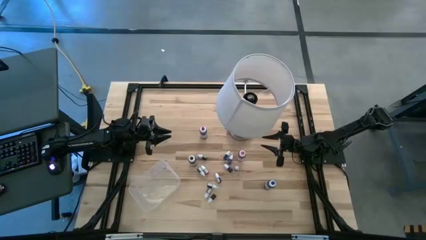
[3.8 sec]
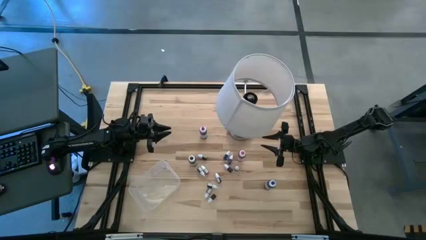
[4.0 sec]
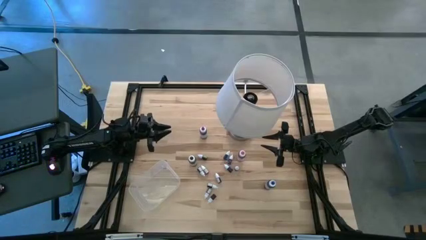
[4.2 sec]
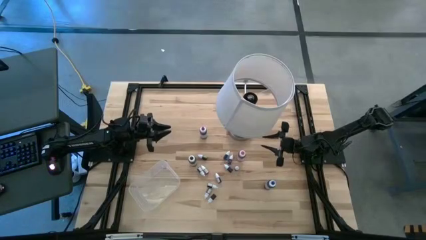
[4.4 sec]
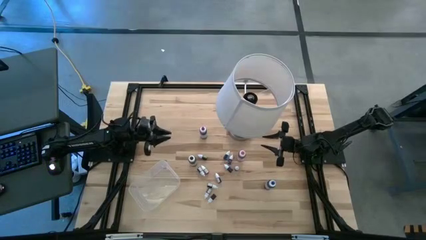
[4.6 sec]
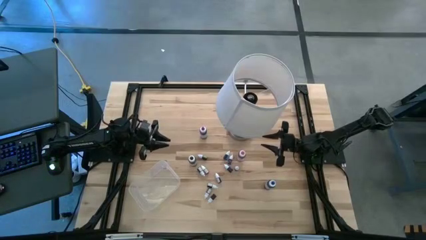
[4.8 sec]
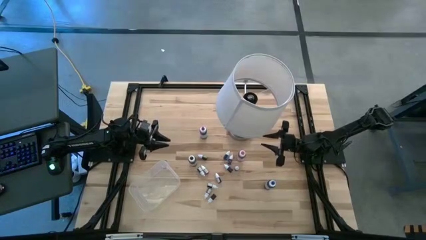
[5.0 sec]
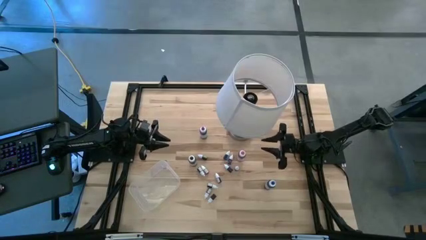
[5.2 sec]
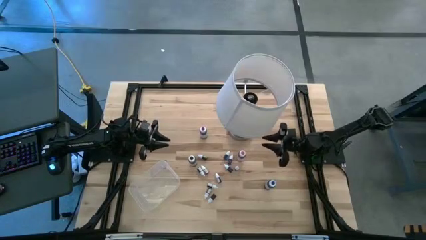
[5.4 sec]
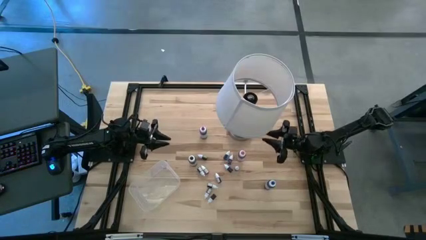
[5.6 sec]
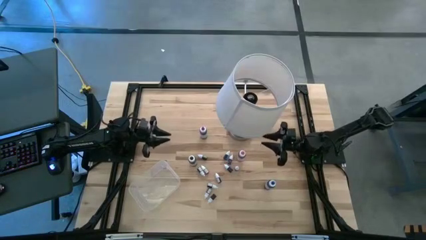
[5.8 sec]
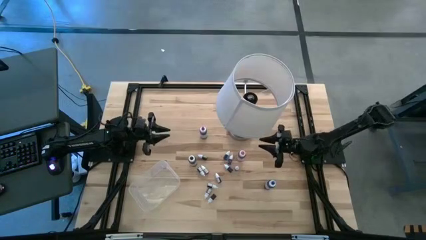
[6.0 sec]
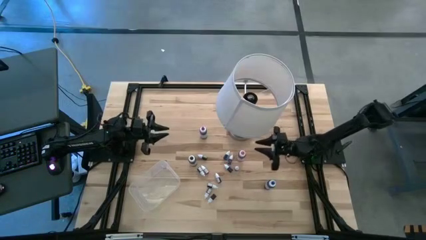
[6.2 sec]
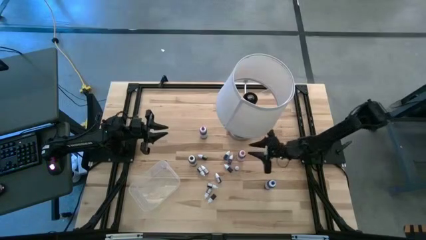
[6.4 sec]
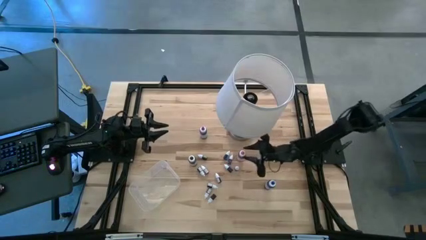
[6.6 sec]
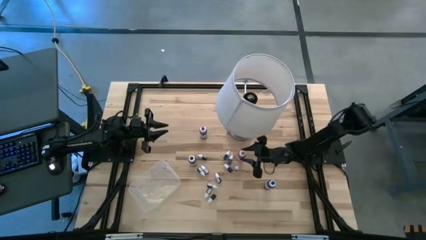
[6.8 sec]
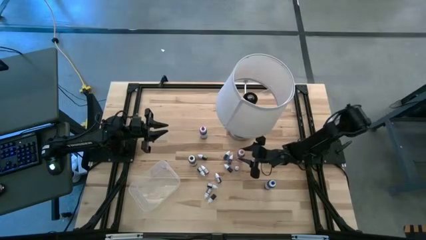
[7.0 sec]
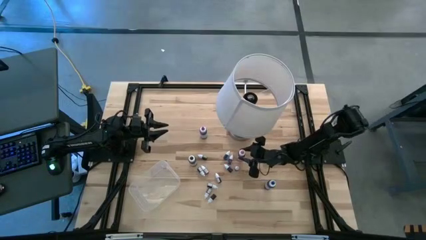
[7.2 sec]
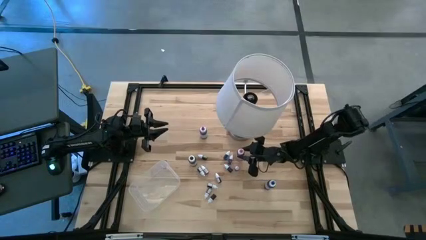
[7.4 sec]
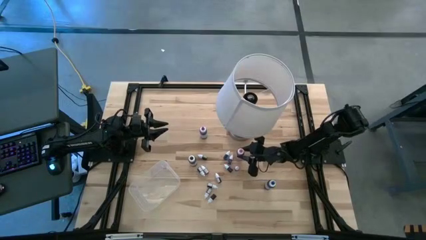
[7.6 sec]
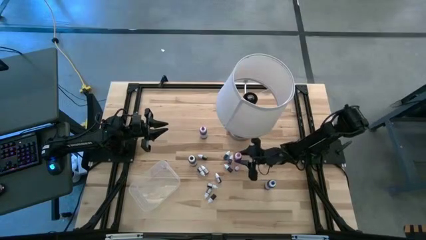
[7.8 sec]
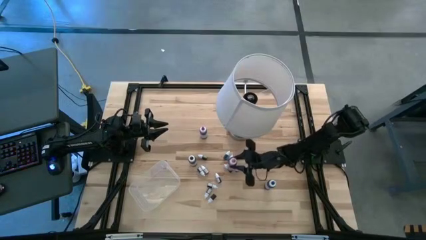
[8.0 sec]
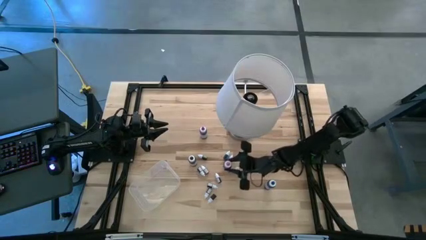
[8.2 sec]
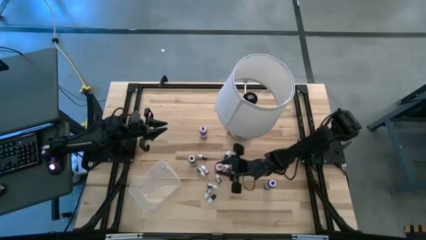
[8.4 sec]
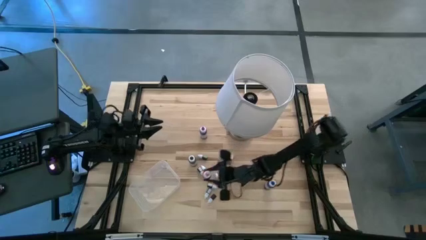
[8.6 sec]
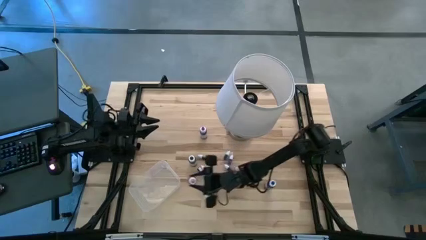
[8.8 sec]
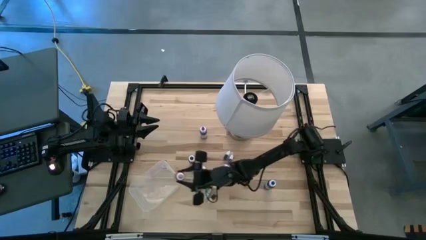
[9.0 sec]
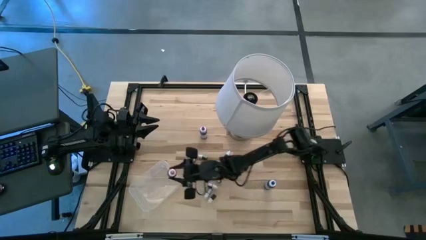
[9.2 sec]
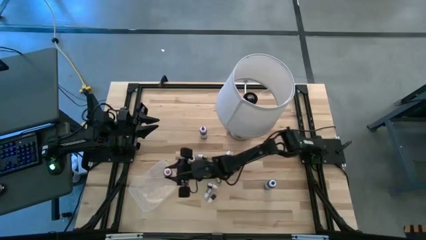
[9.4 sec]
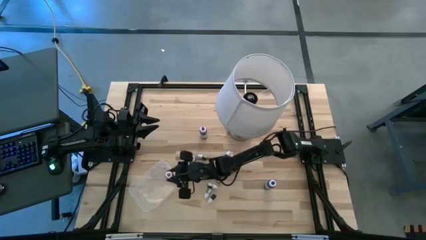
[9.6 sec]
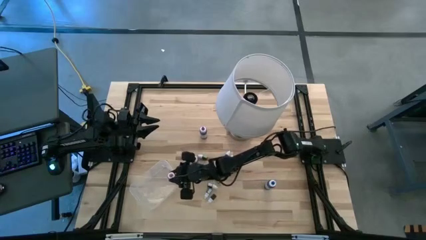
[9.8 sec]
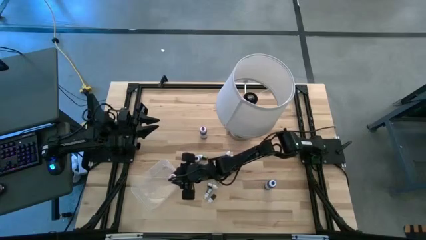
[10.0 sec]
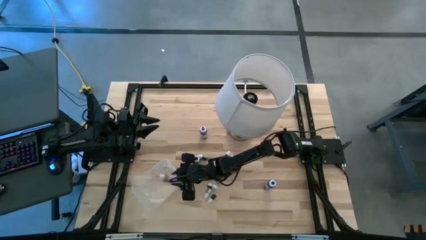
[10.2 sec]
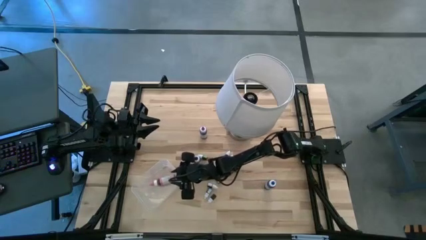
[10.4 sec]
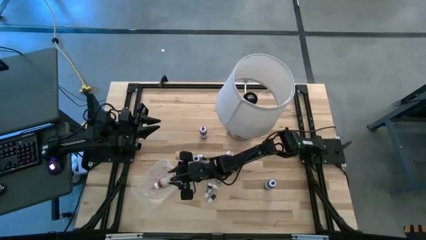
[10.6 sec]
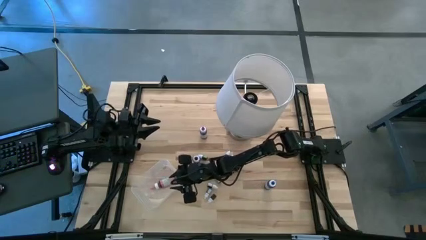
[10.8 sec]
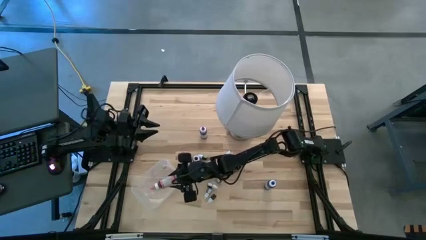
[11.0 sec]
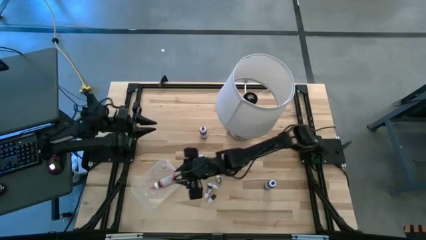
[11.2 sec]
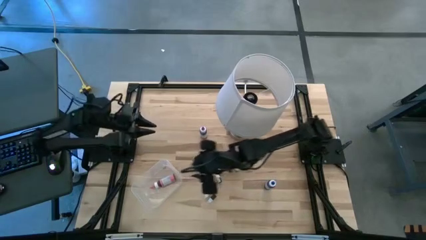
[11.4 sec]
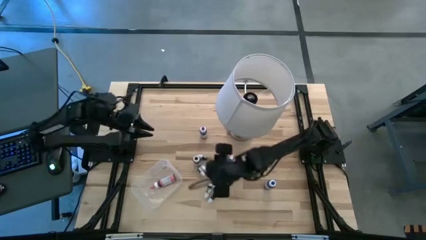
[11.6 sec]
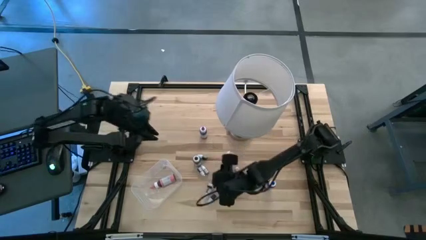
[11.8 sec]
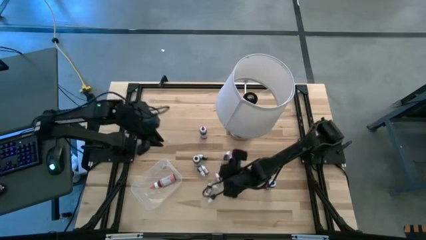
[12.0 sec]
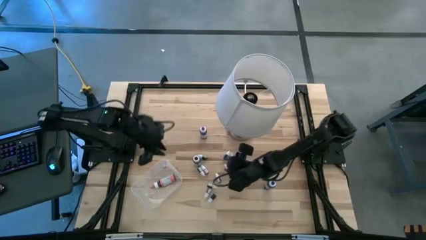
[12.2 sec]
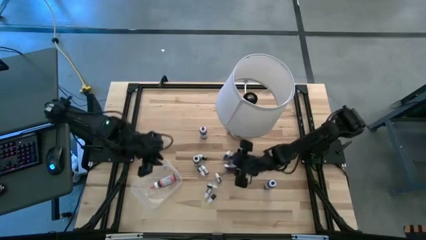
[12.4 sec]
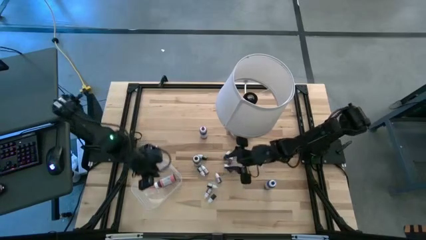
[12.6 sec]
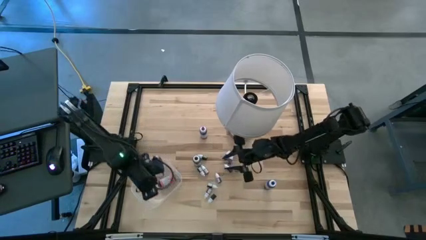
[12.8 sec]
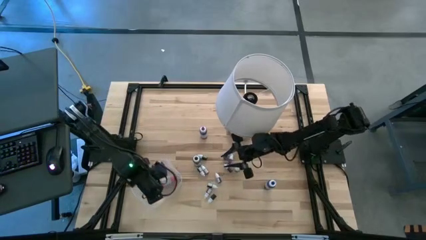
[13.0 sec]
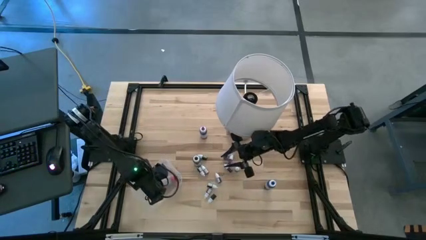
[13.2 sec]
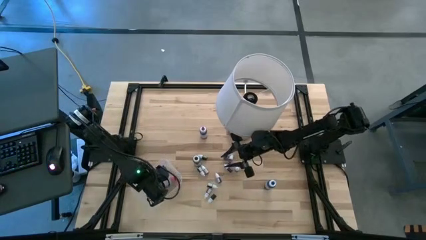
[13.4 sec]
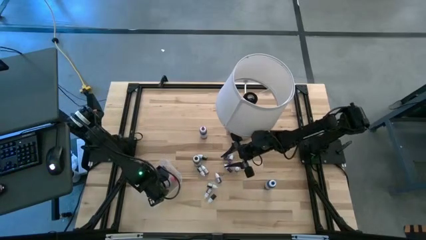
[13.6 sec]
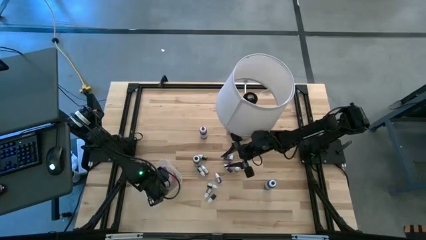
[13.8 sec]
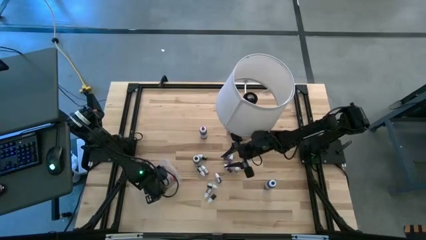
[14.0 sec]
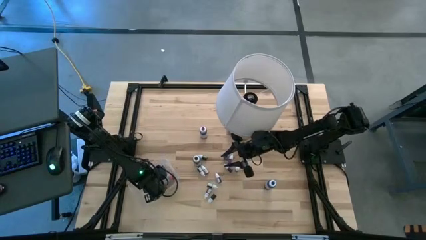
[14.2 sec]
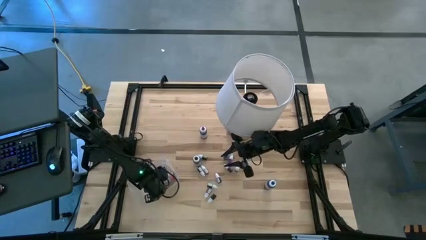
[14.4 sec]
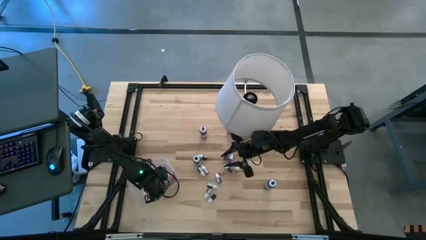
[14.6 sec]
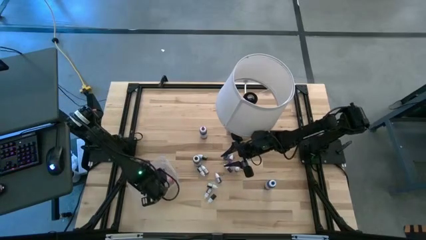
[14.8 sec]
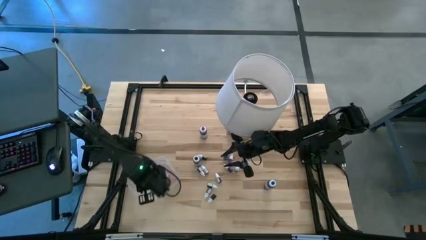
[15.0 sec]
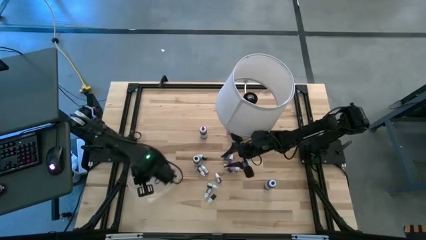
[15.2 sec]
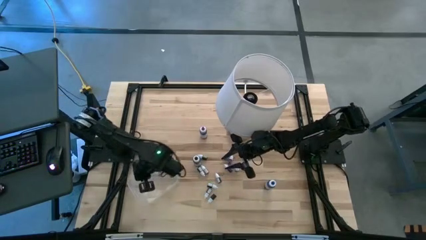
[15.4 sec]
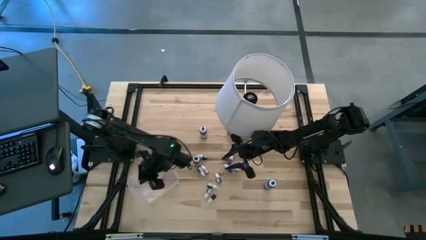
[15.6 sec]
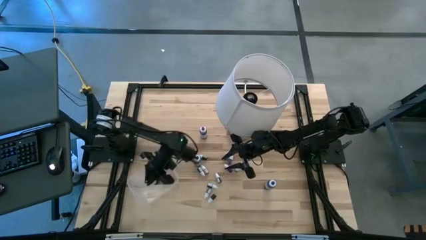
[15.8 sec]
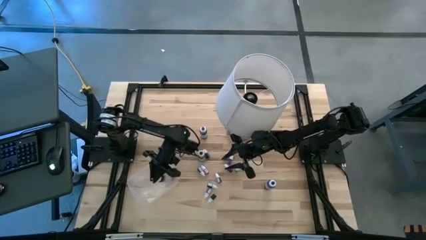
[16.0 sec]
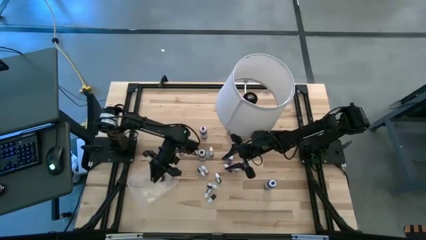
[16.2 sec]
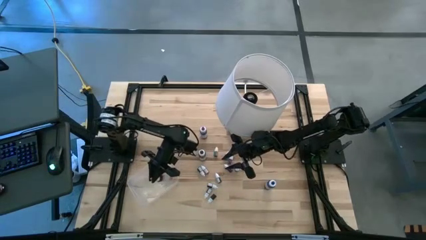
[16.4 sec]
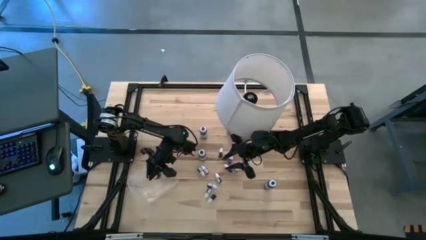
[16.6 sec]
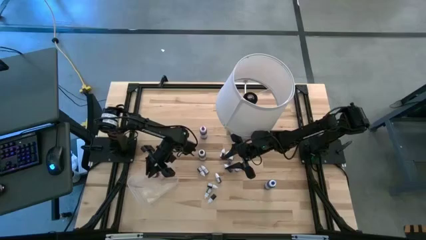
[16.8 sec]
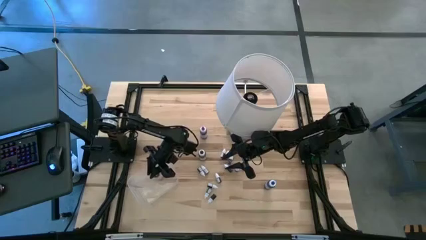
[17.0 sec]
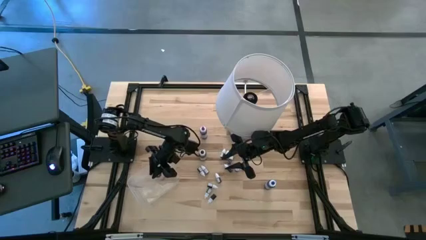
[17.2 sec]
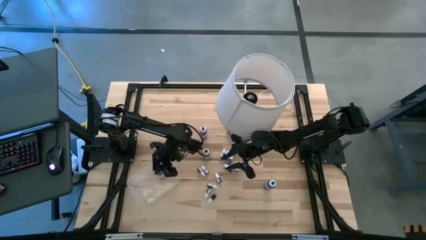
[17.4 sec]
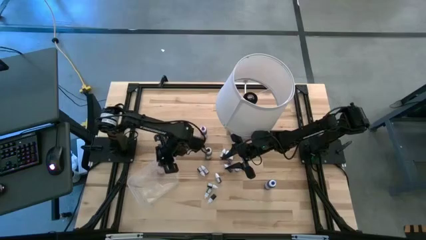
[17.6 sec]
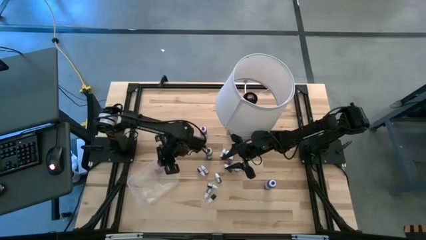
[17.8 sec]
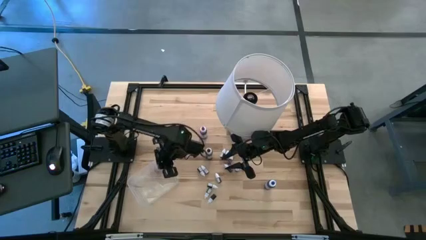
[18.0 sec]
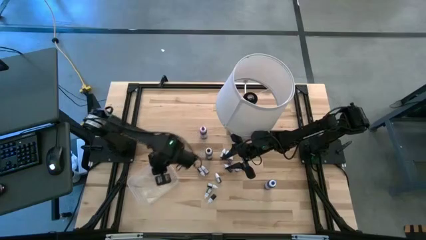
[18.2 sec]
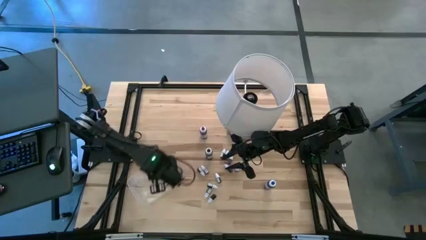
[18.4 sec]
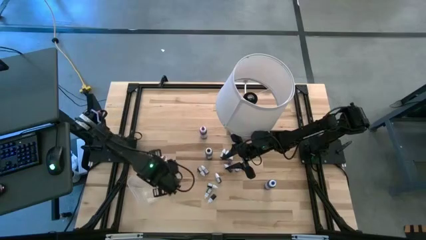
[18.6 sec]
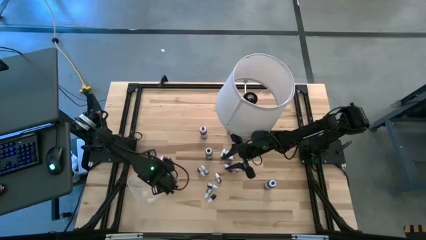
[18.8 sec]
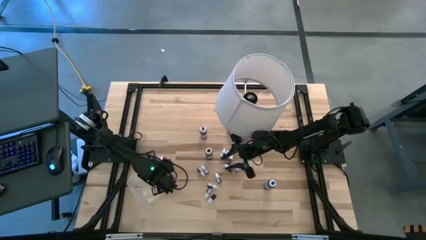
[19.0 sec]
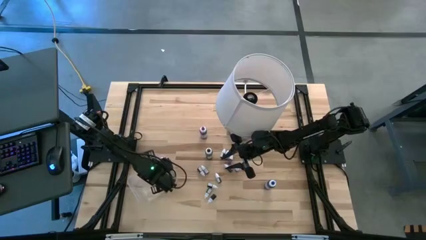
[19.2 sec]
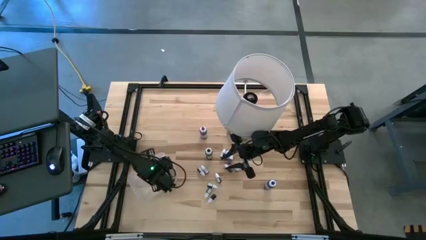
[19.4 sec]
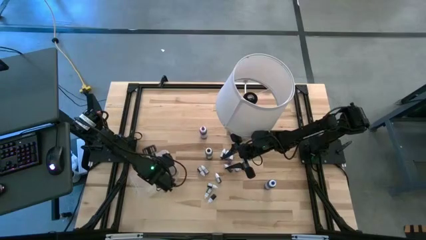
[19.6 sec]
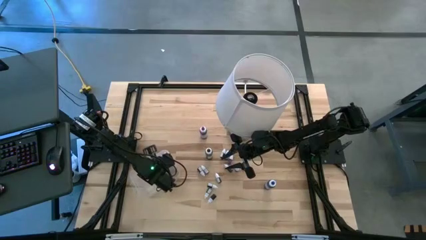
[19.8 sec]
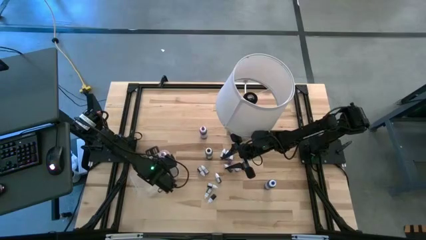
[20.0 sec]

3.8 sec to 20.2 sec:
Task: Pick & Place food coloring
Put the pink food coloring bottle into the transparent bin
